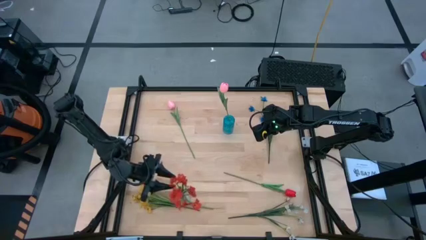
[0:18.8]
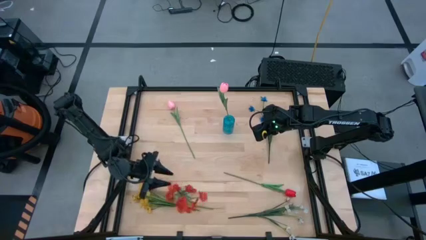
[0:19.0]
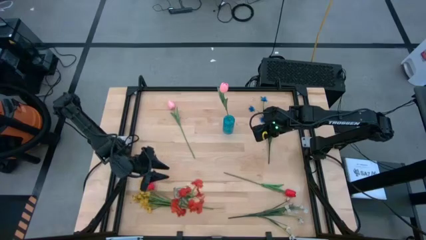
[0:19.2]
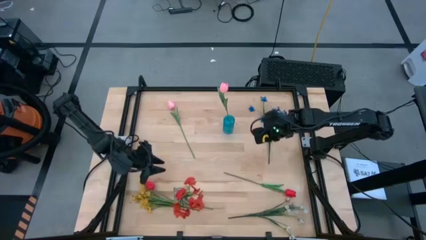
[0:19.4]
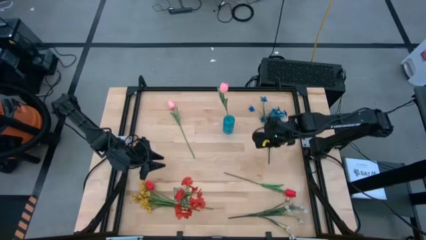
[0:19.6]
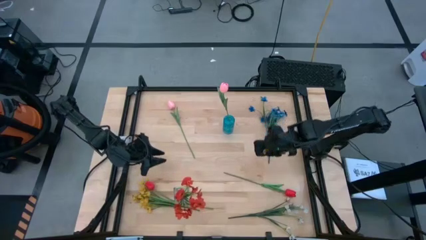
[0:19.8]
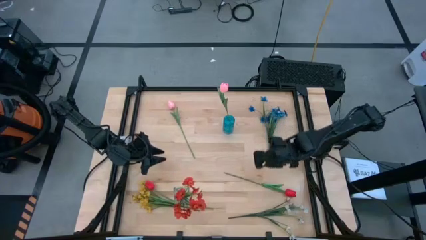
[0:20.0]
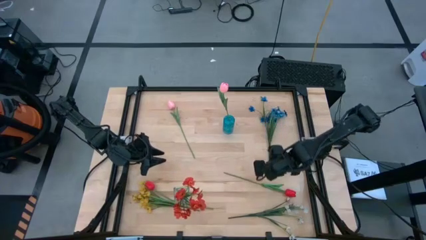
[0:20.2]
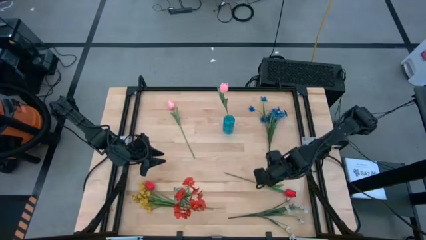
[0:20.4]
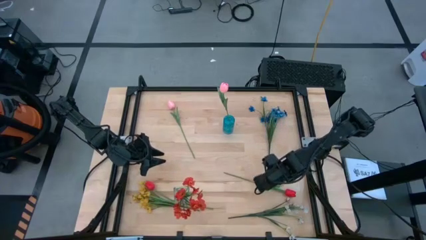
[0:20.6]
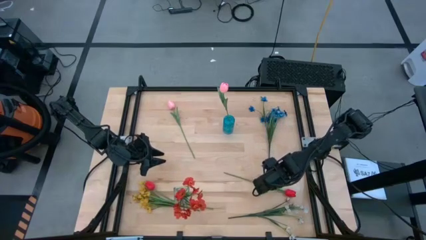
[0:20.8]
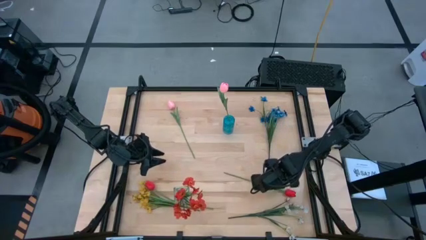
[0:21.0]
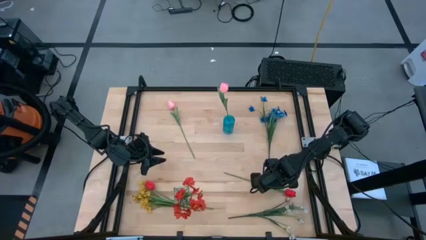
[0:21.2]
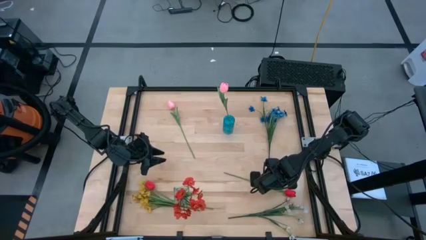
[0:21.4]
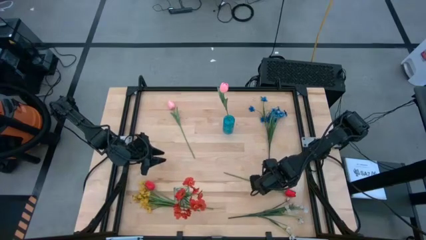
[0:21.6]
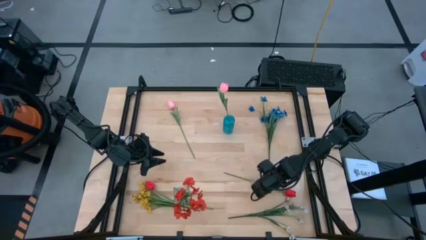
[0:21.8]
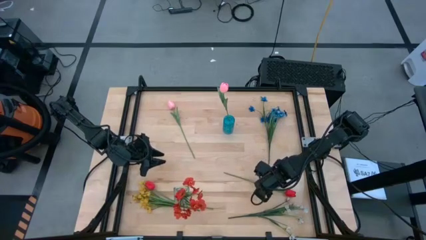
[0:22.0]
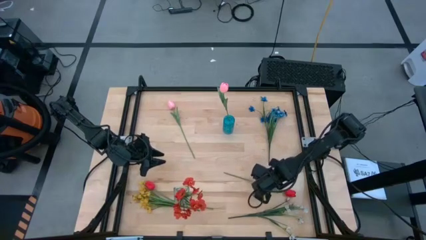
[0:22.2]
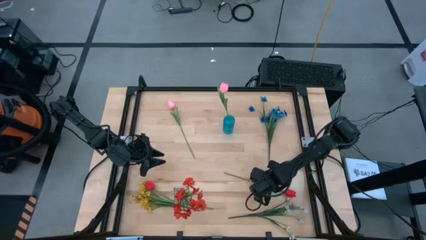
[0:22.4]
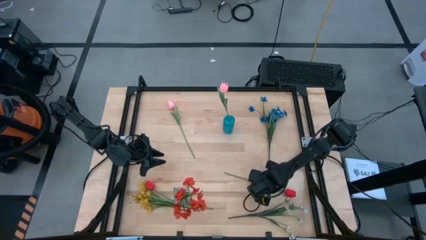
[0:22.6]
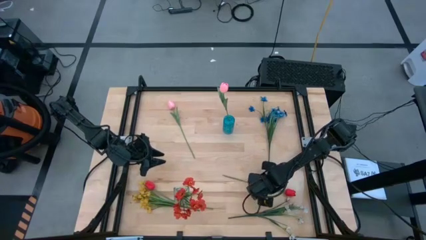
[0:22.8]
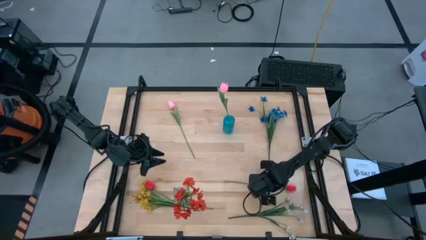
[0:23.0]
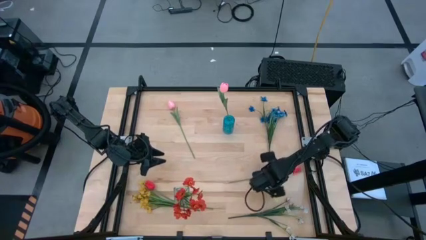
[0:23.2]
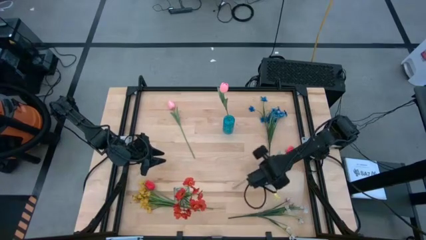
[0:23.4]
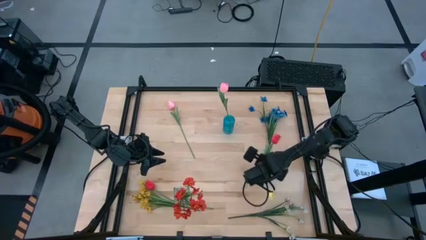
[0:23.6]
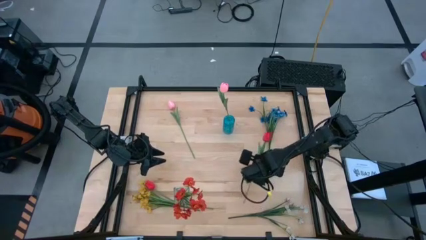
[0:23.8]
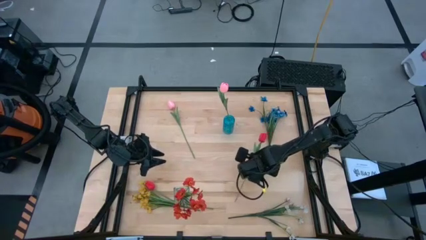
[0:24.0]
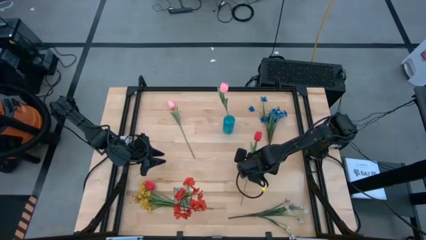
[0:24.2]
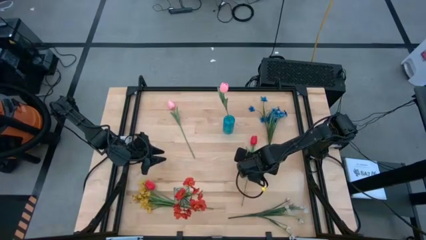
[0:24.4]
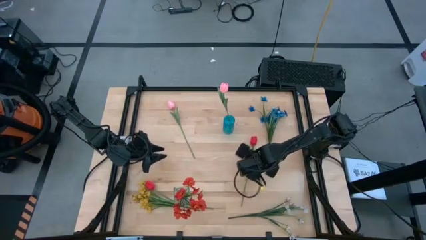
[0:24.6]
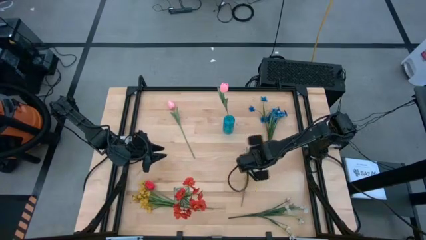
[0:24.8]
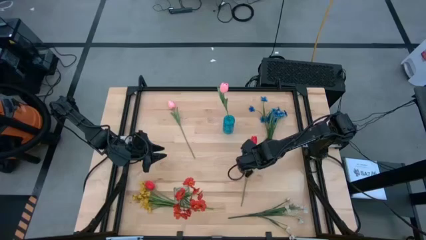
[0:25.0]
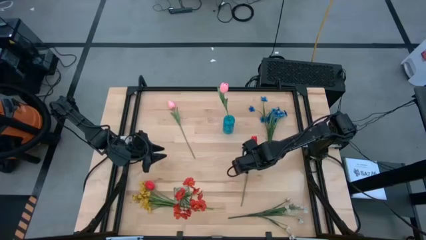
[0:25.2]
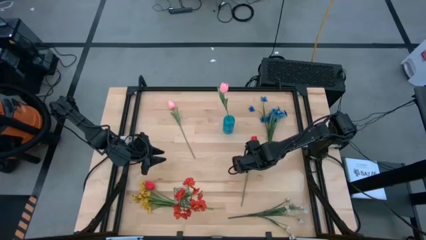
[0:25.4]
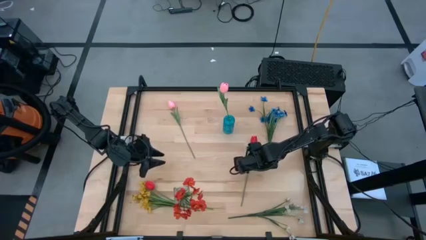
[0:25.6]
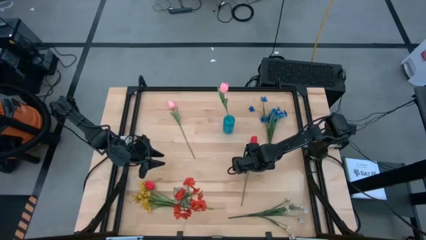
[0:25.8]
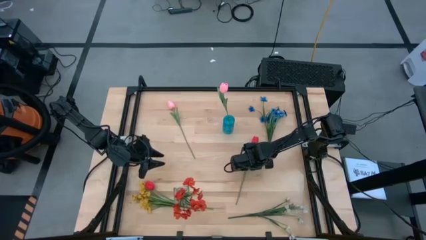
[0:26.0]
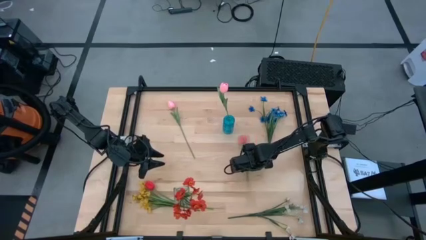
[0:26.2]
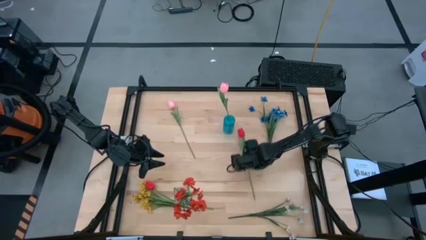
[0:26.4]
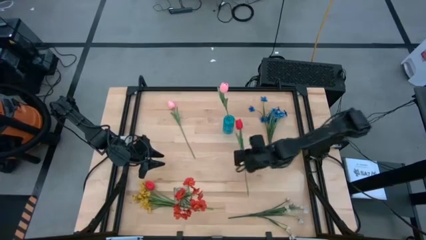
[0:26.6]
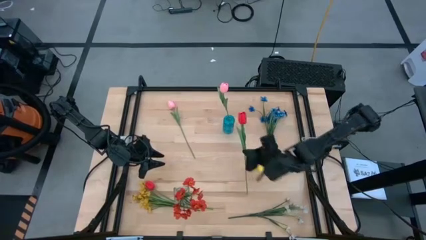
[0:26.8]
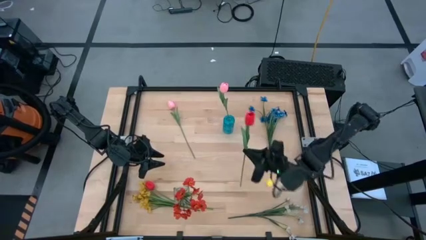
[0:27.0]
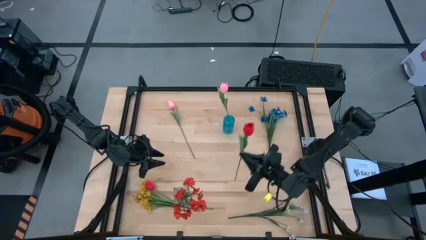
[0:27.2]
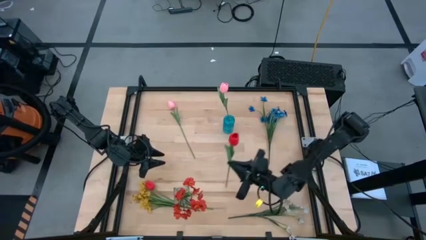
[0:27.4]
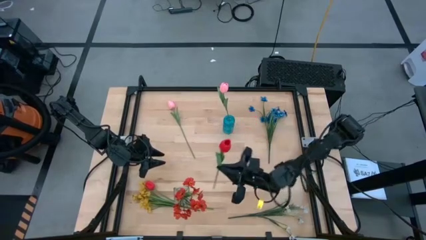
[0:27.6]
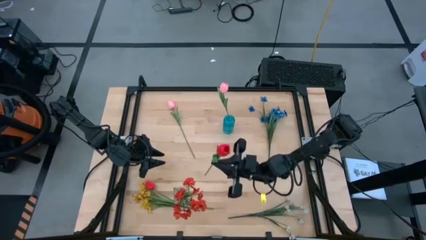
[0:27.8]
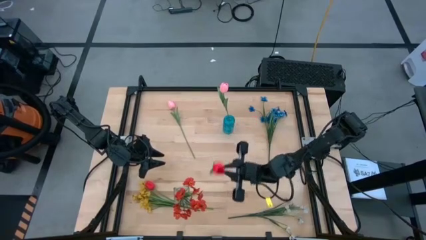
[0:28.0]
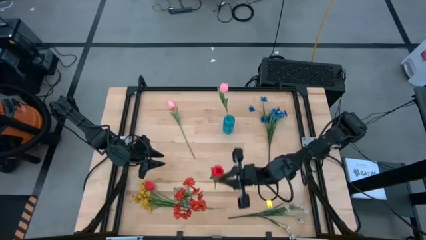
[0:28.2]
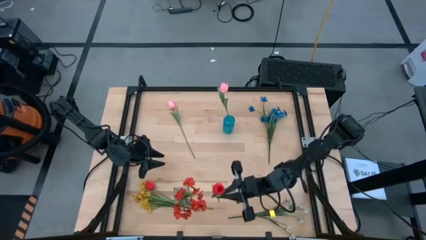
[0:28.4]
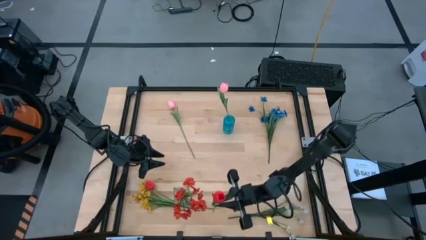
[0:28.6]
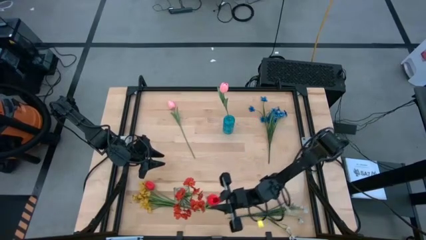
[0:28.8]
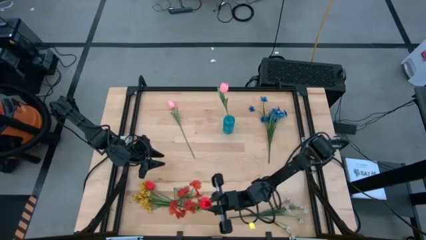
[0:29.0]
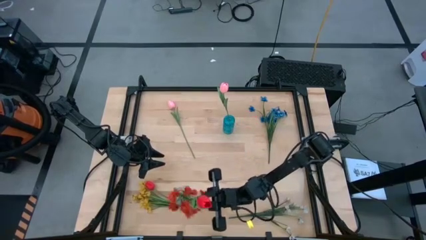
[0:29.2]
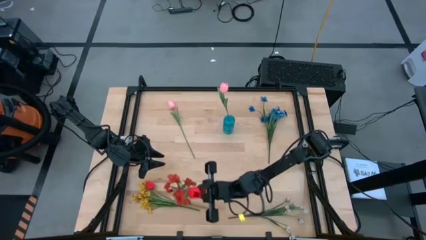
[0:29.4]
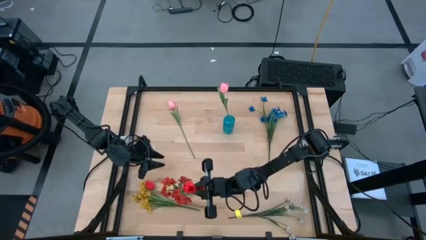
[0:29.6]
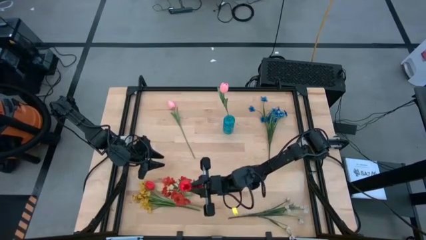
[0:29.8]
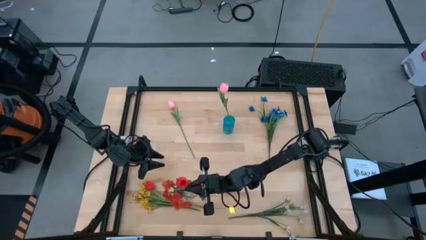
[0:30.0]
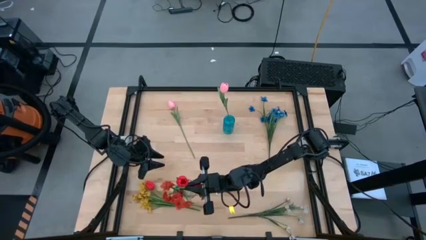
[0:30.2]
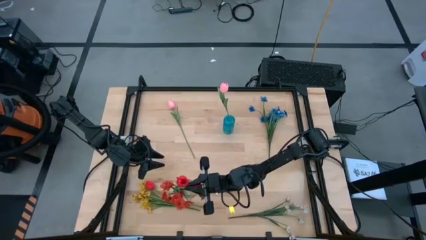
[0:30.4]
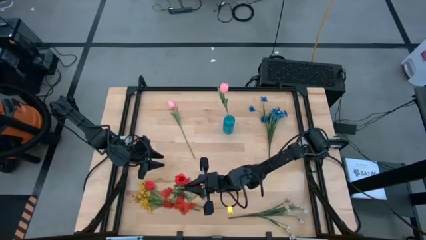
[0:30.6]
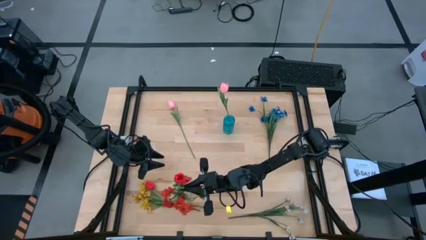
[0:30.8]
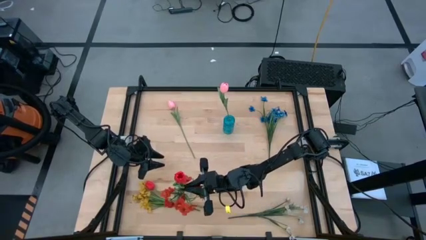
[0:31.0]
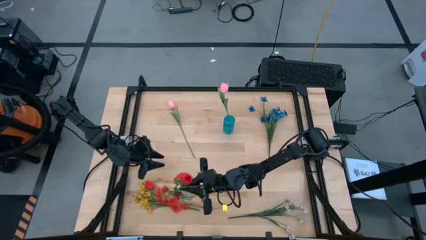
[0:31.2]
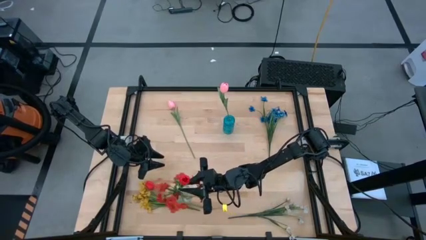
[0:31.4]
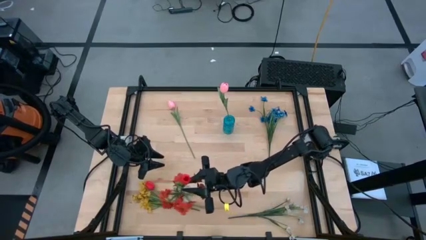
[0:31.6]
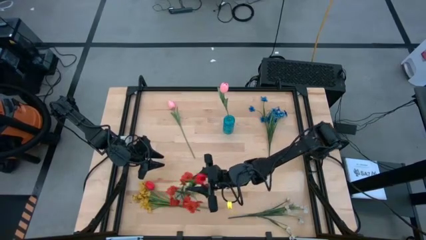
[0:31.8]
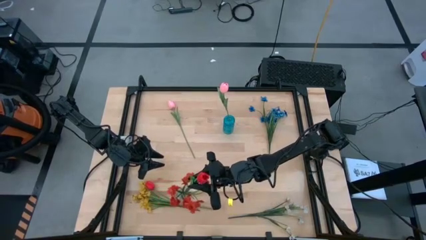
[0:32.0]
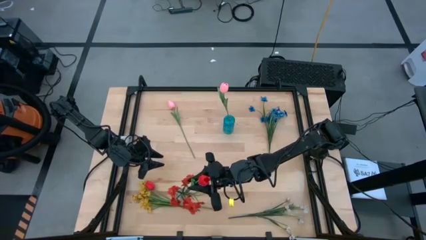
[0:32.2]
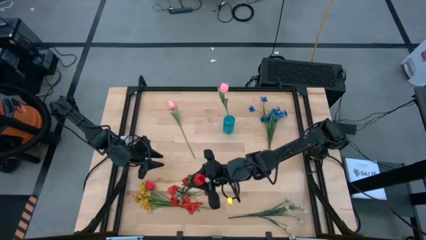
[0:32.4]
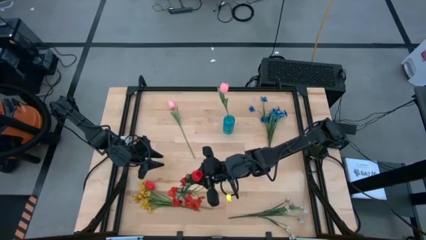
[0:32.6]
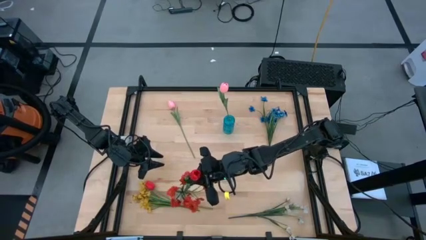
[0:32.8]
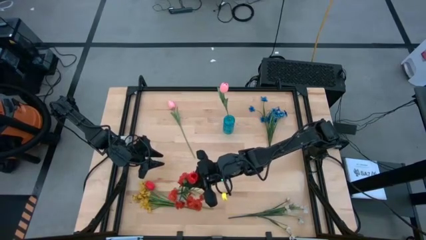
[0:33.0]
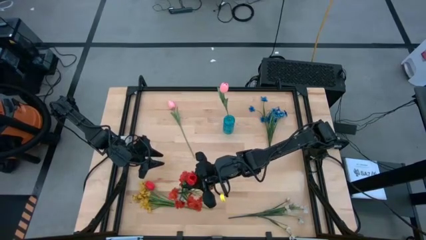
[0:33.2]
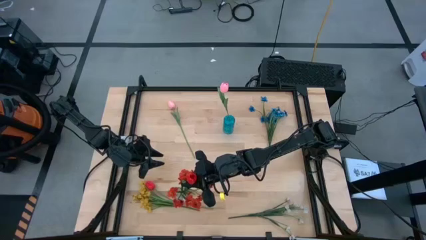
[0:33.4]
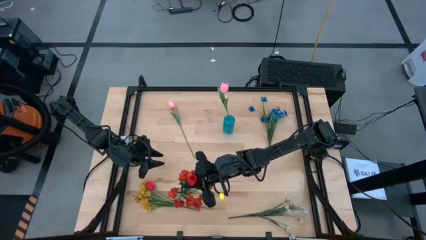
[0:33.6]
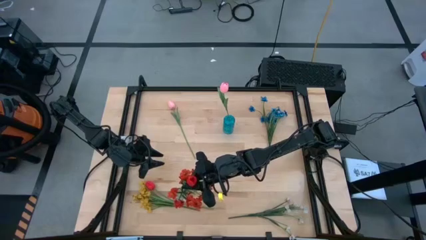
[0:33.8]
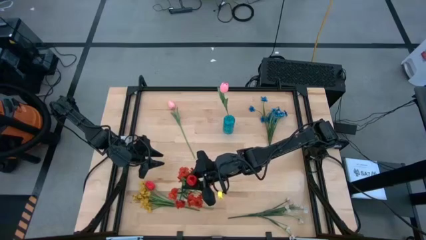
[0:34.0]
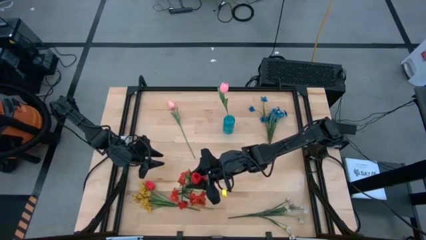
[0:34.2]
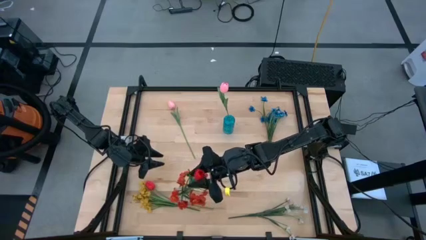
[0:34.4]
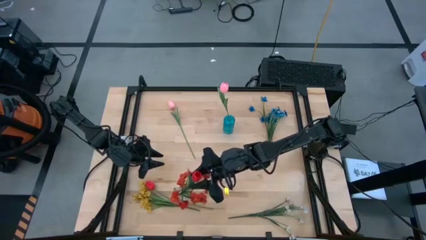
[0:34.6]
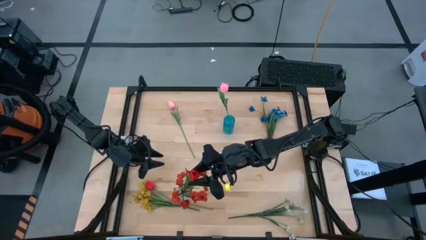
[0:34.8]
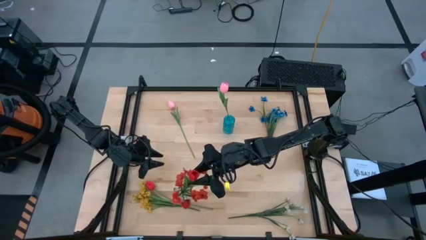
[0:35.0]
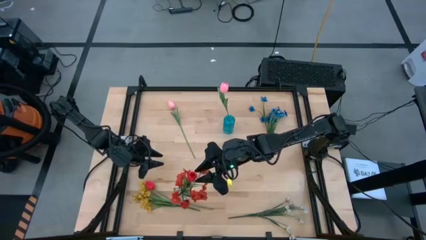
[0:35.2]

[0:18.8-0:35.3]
Task: Sort flowers into vase by color
Put the right red tulip into the transparent vase
